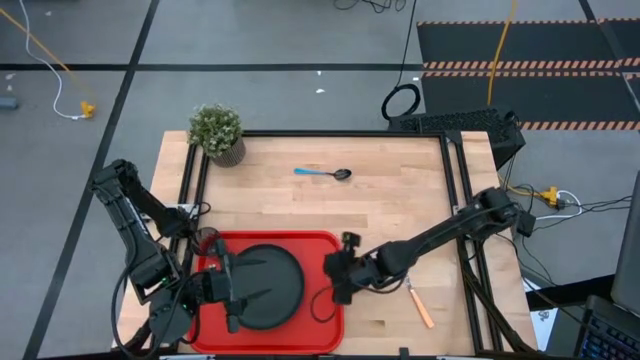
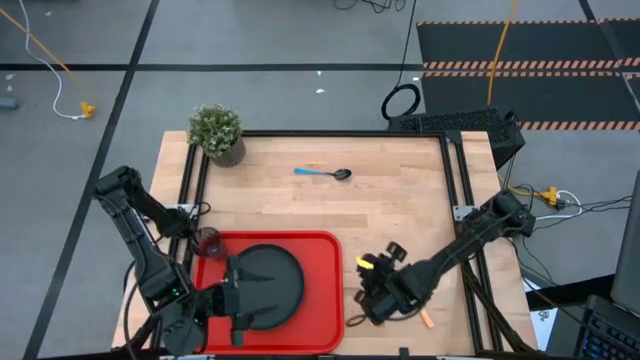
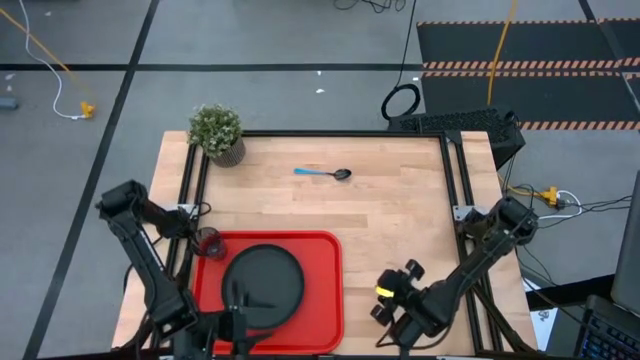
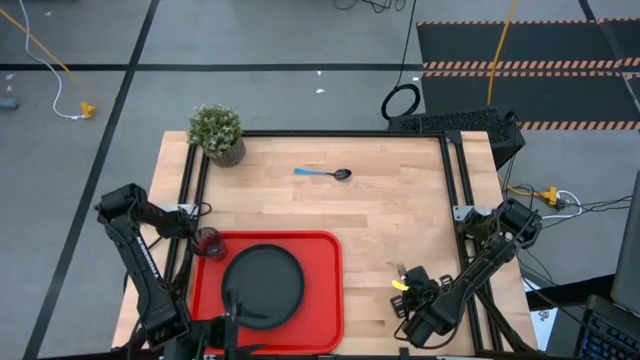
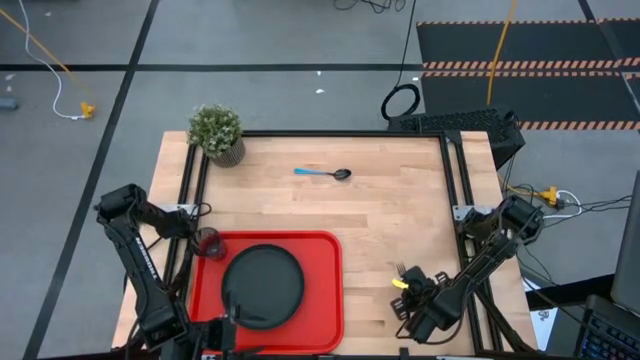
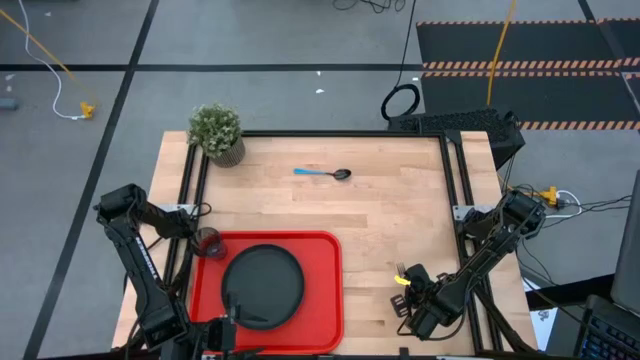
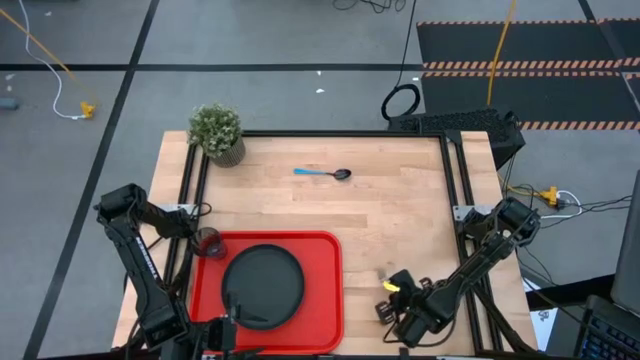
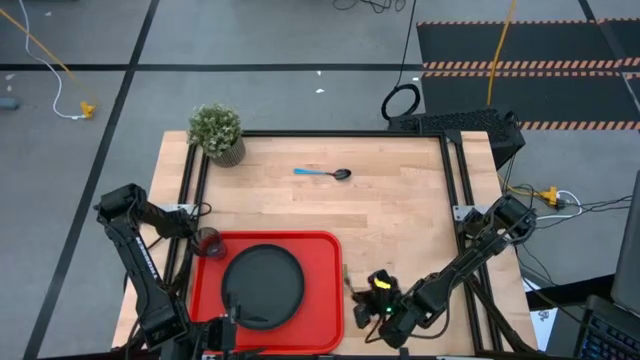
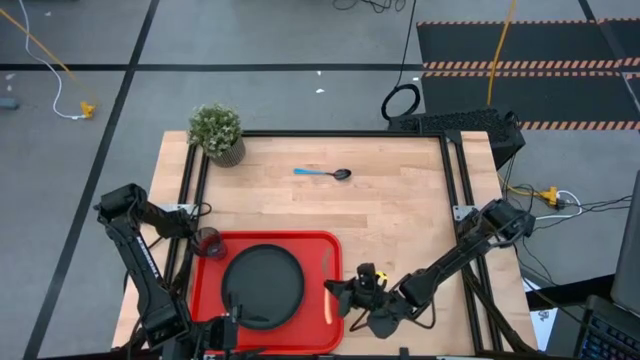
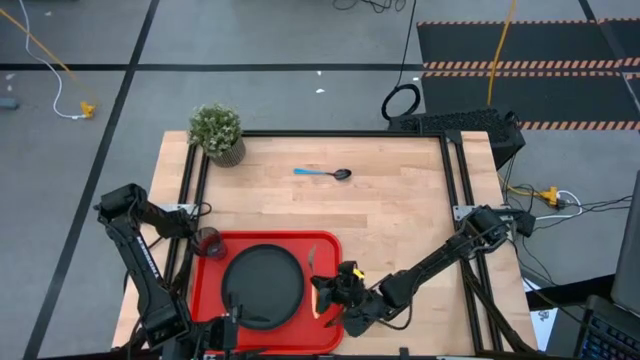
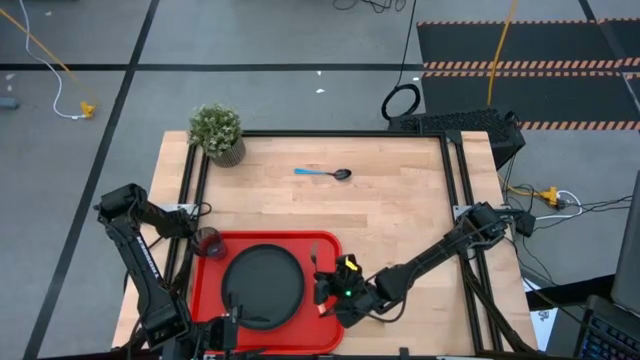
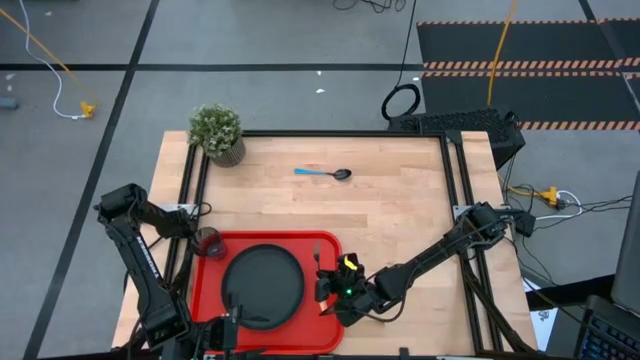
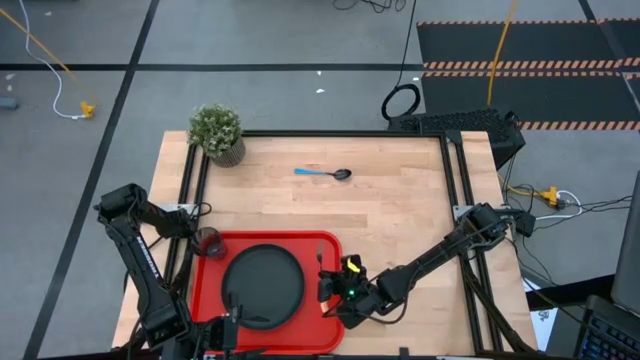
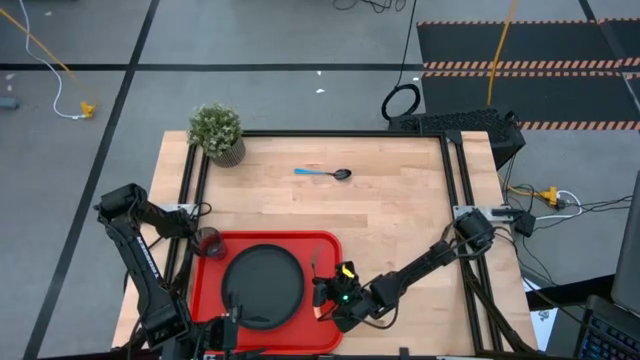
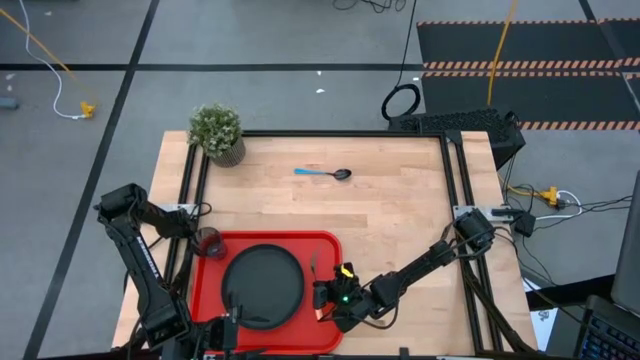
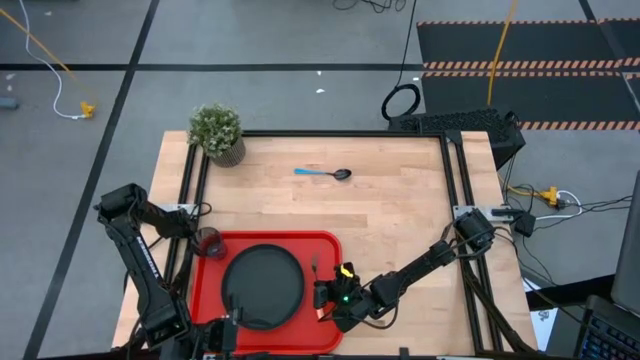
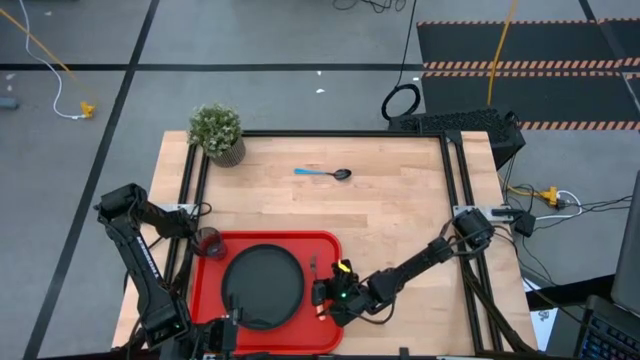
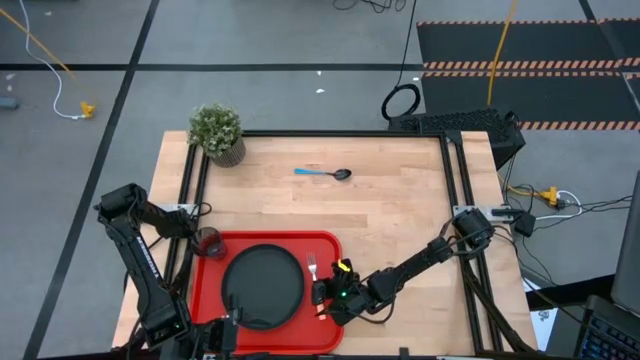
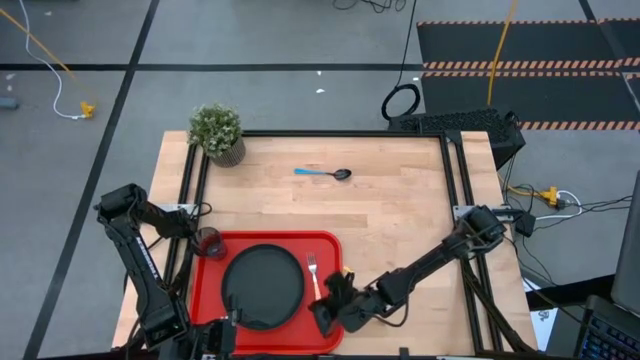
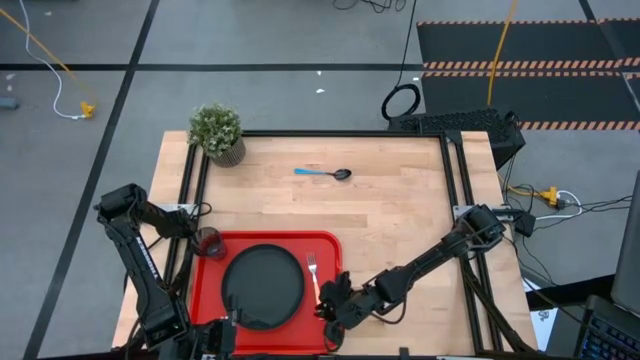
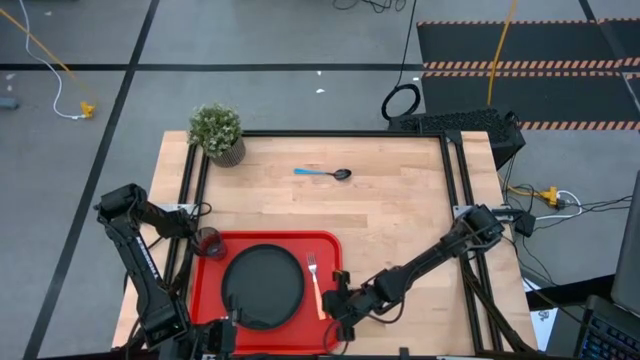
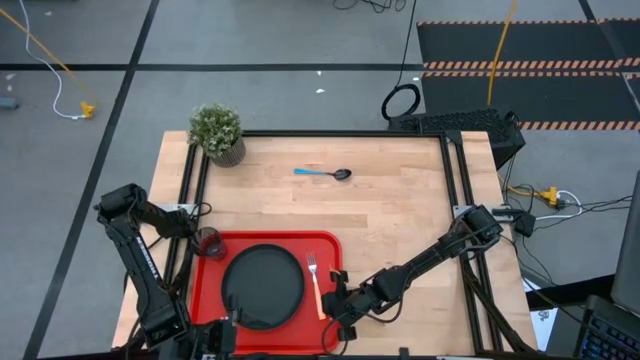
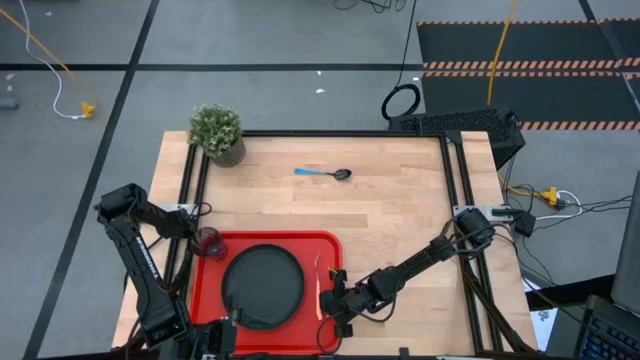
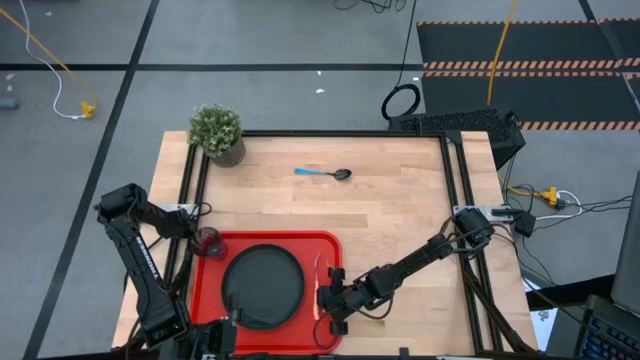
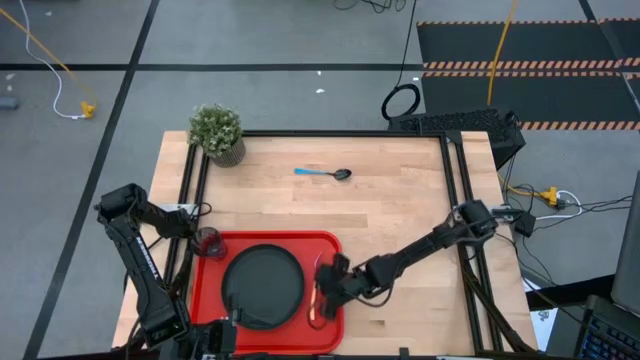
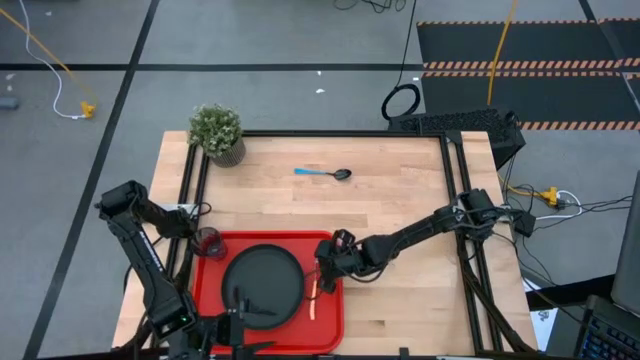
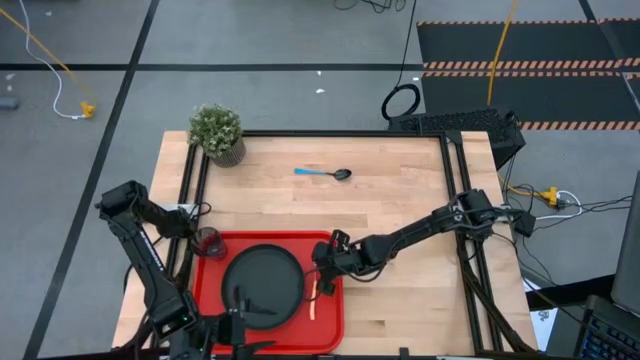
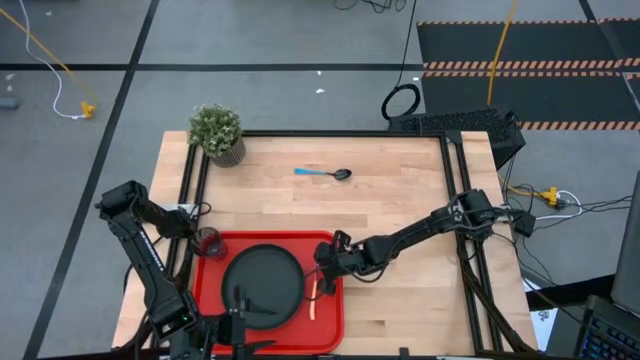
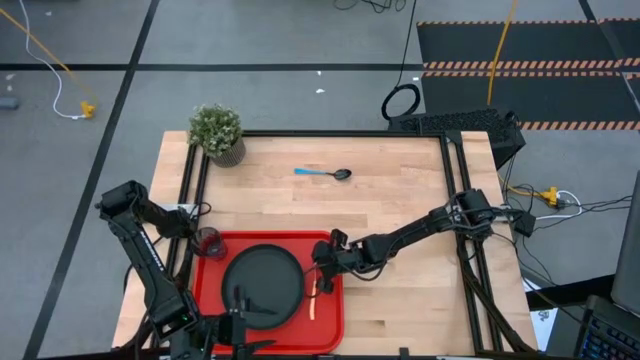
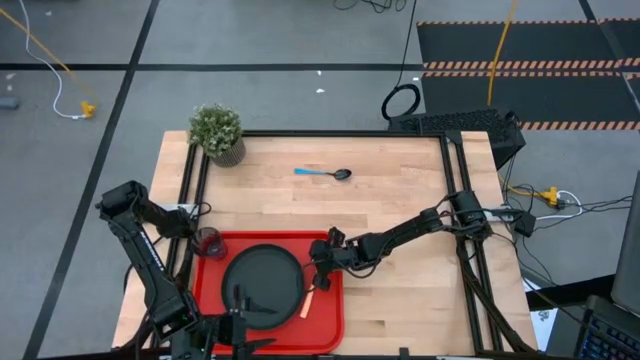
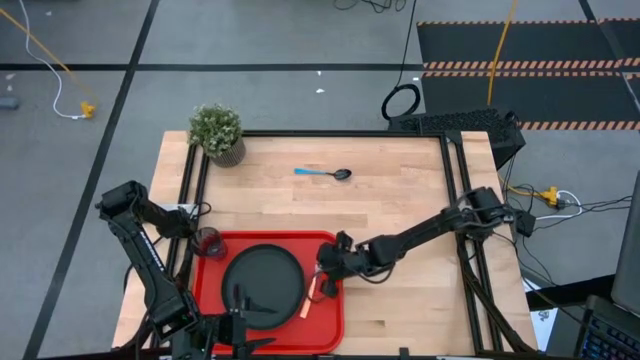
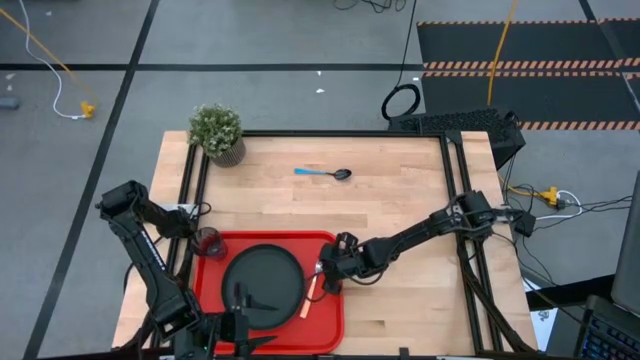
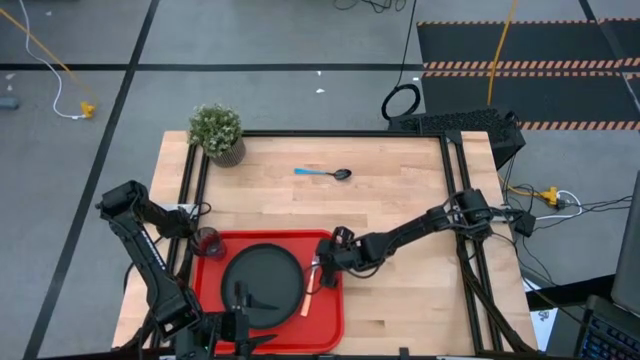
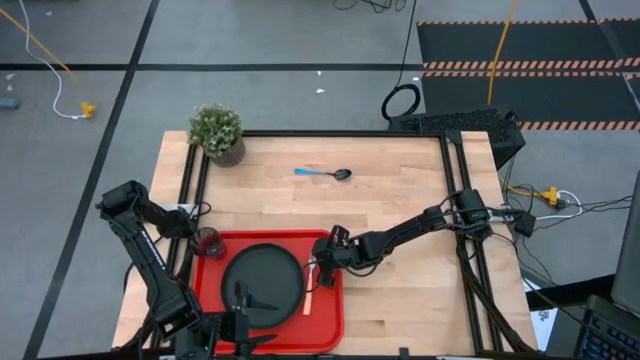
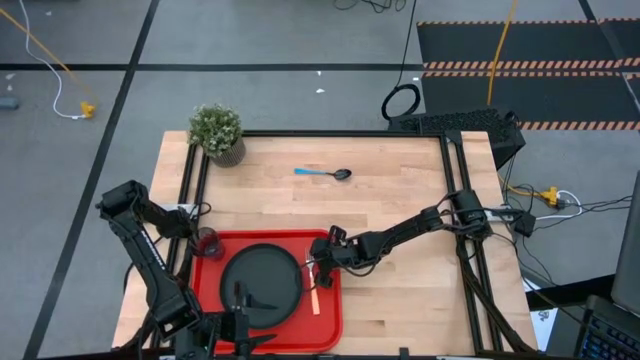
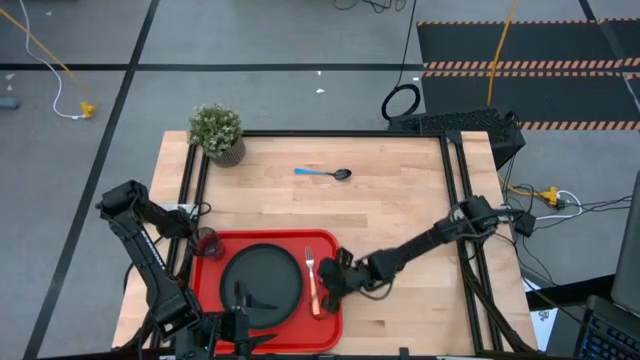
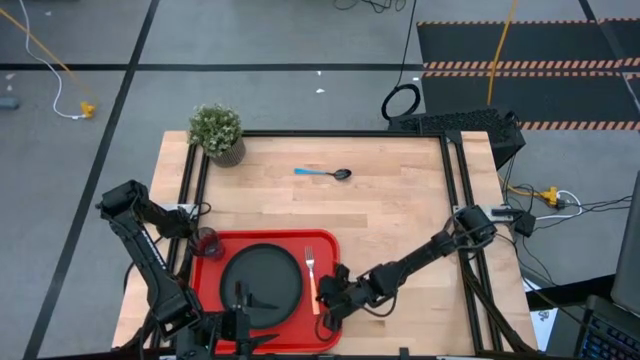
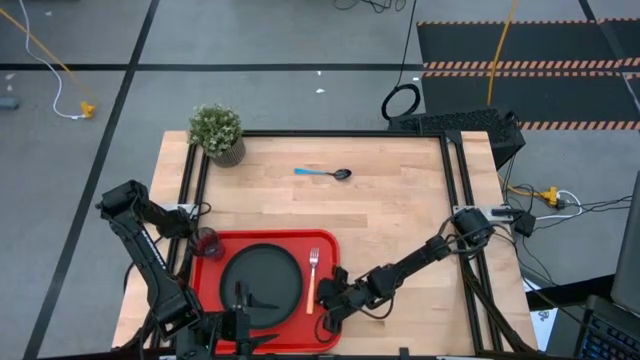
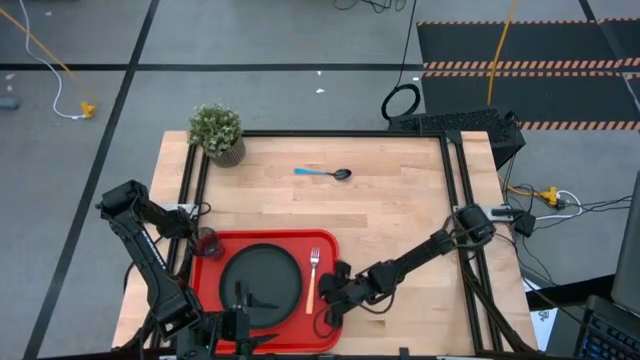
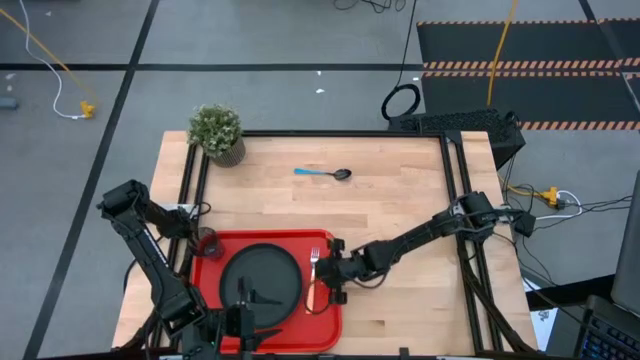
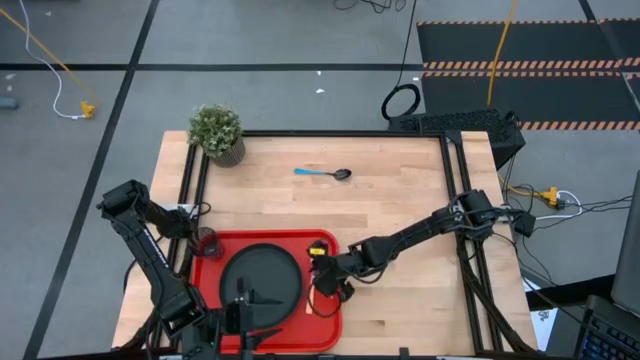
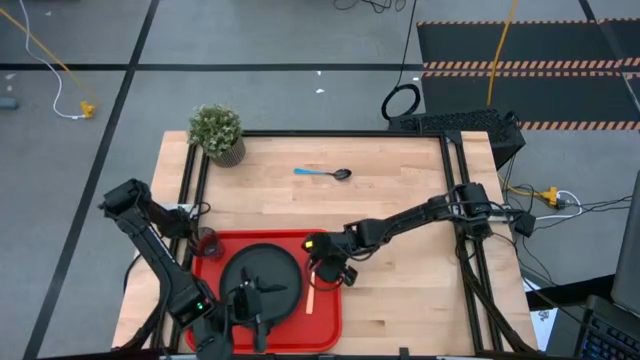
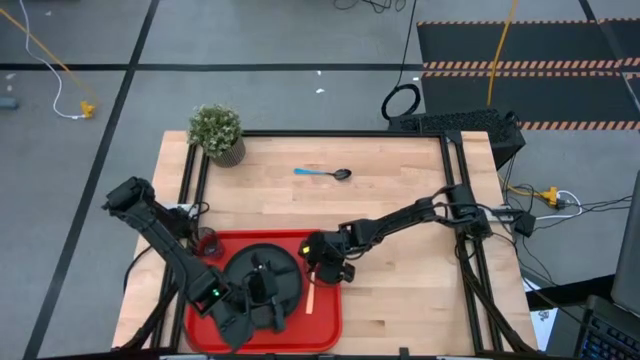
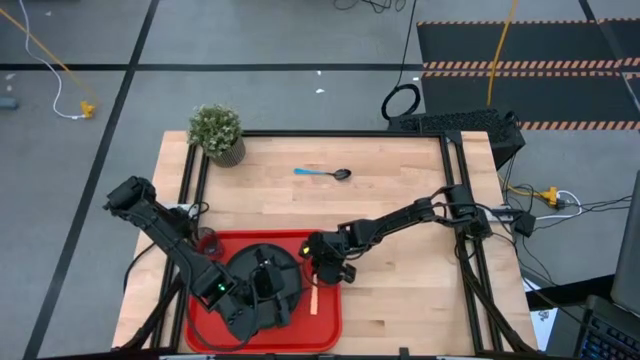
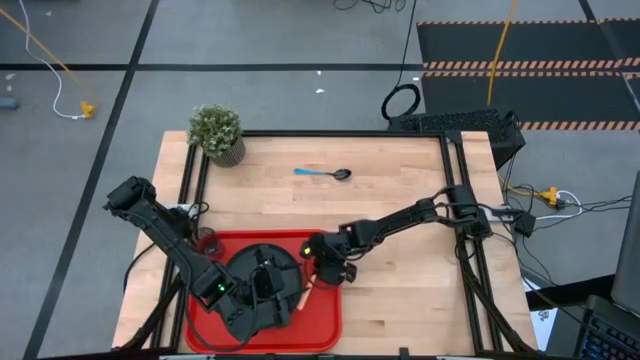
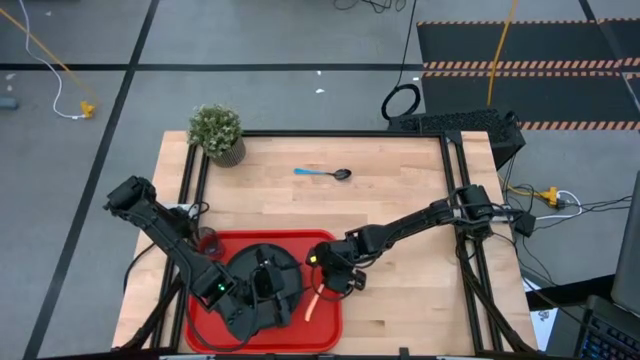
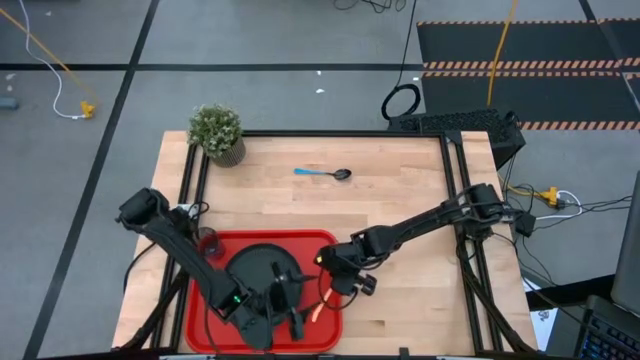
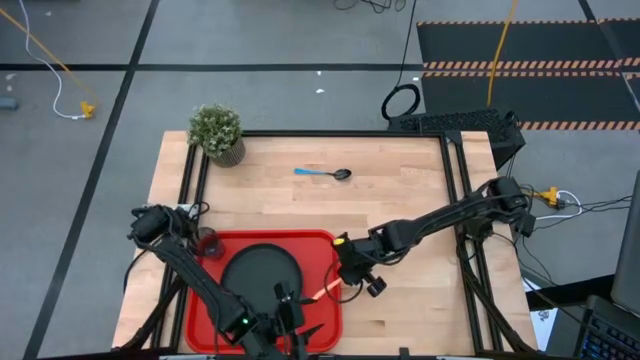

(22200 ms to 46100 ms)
Task: Pick and place plate/cup/fork/spoon on tray
Put the orange fork on the red serving tray on the right side of the black plate
